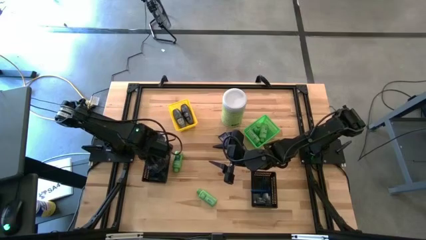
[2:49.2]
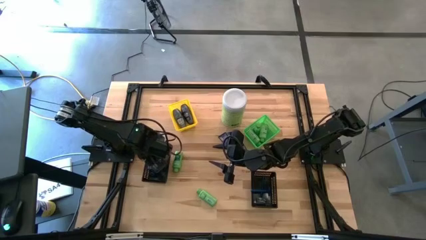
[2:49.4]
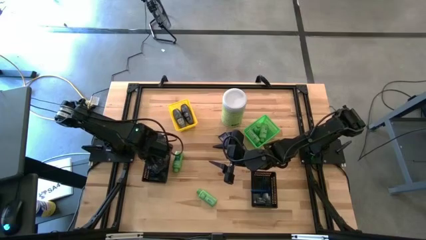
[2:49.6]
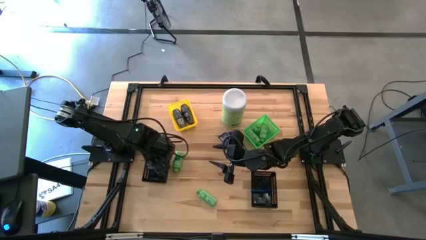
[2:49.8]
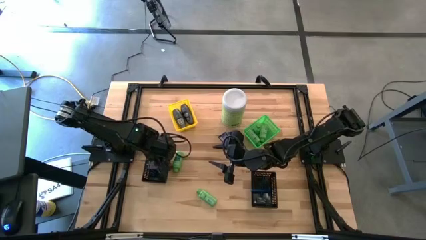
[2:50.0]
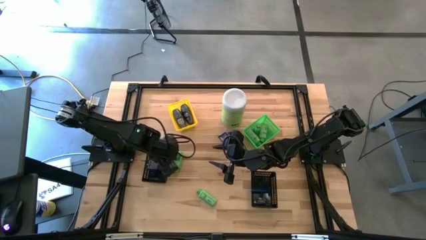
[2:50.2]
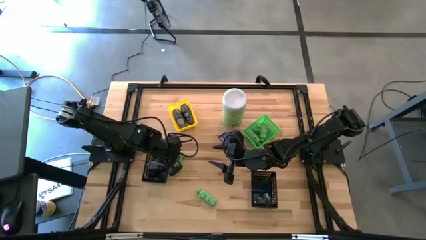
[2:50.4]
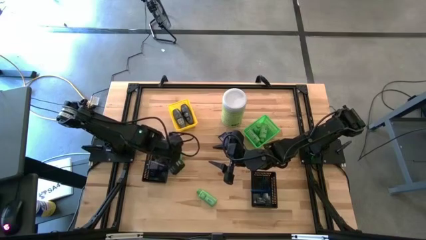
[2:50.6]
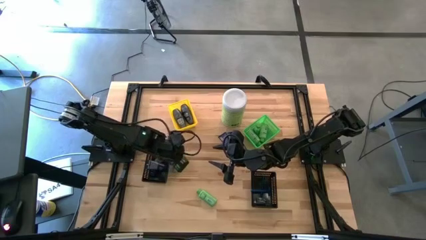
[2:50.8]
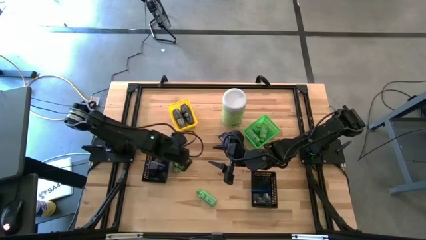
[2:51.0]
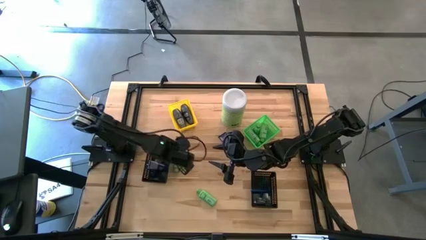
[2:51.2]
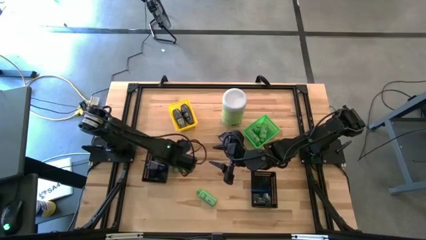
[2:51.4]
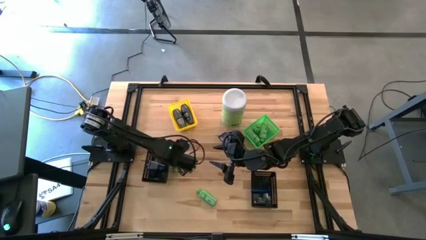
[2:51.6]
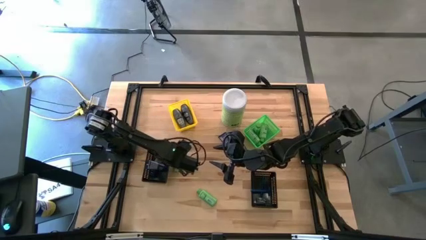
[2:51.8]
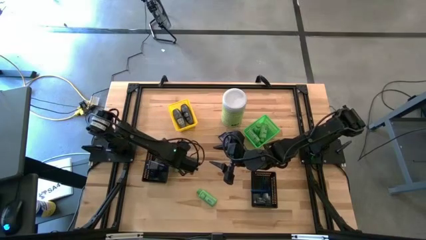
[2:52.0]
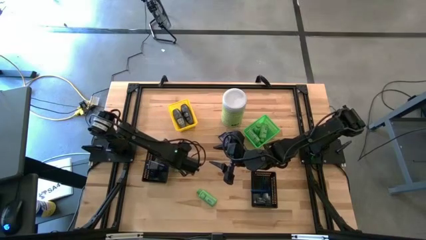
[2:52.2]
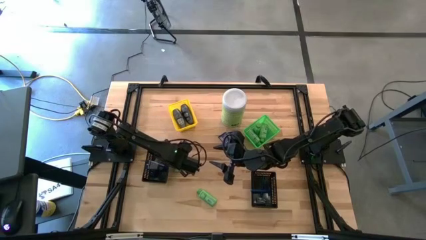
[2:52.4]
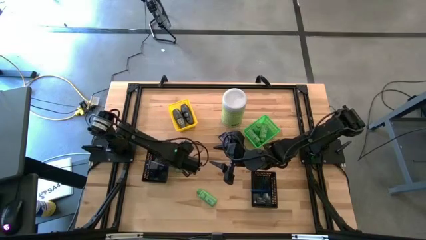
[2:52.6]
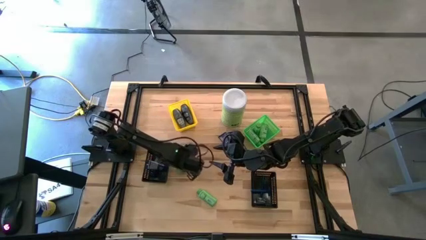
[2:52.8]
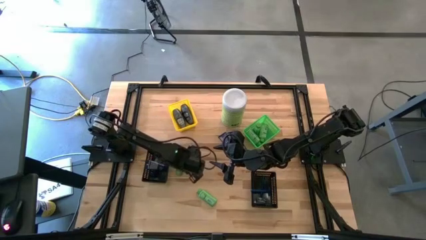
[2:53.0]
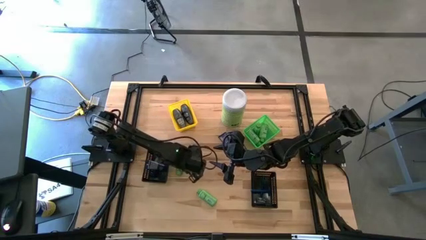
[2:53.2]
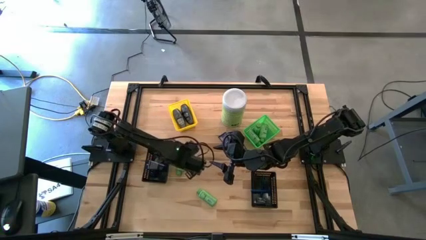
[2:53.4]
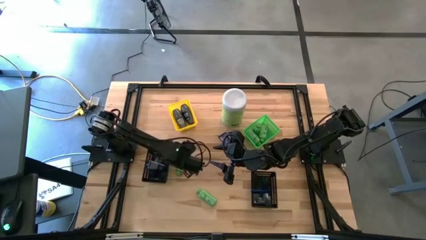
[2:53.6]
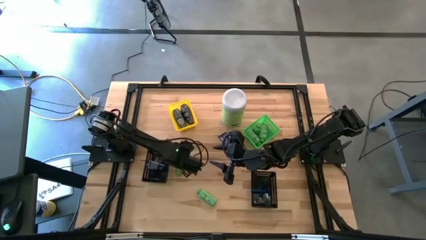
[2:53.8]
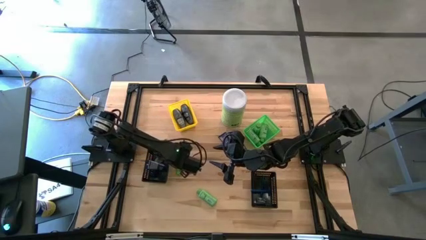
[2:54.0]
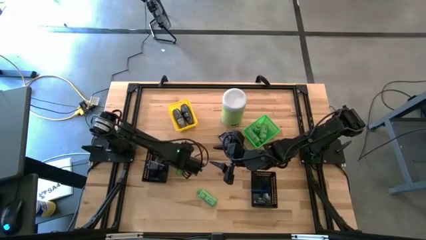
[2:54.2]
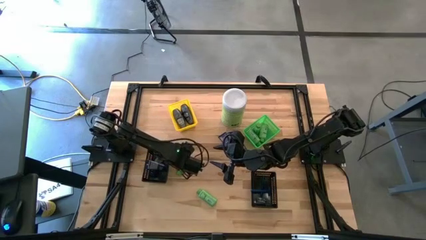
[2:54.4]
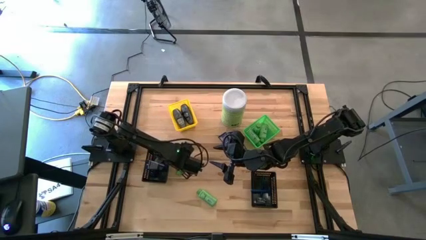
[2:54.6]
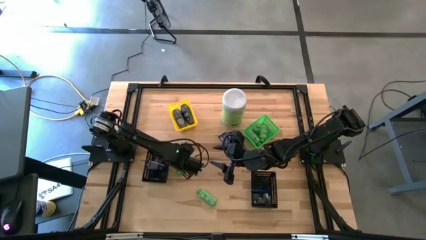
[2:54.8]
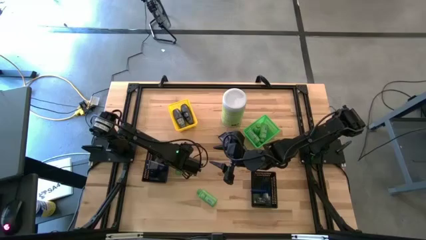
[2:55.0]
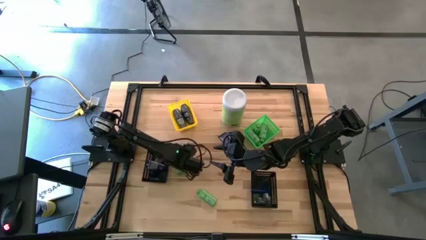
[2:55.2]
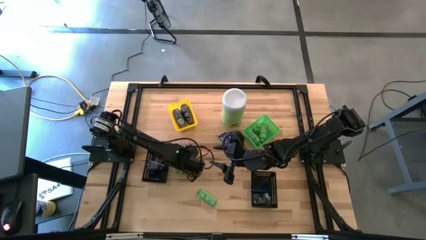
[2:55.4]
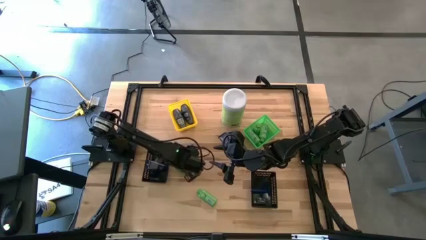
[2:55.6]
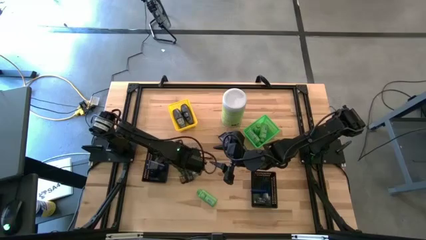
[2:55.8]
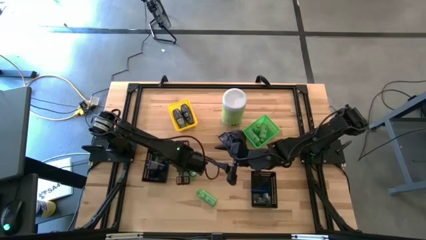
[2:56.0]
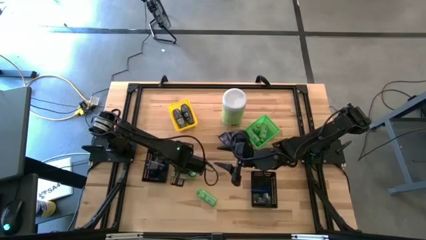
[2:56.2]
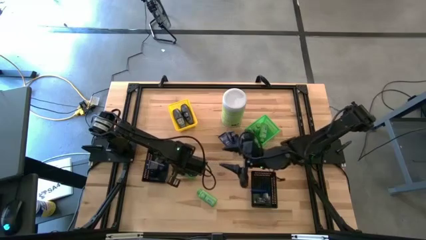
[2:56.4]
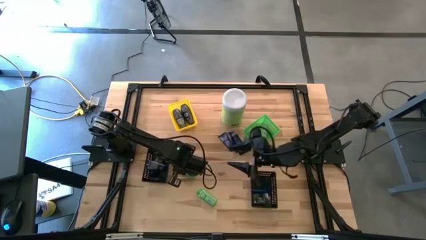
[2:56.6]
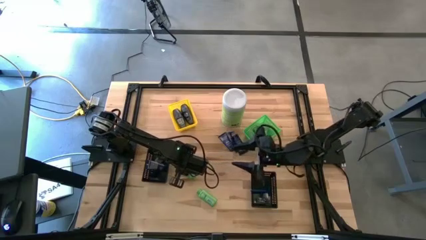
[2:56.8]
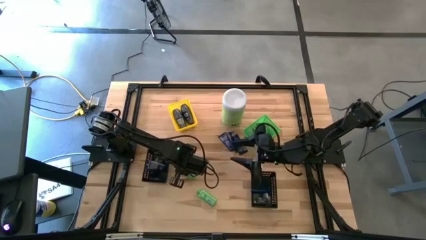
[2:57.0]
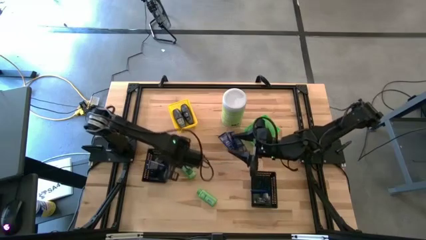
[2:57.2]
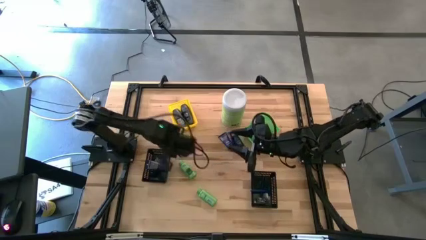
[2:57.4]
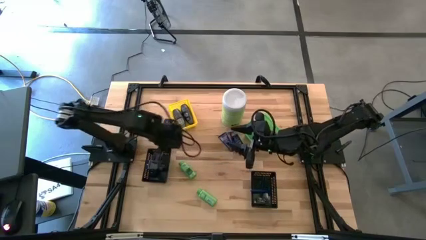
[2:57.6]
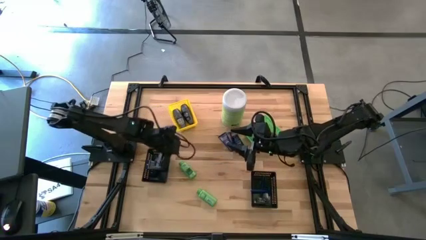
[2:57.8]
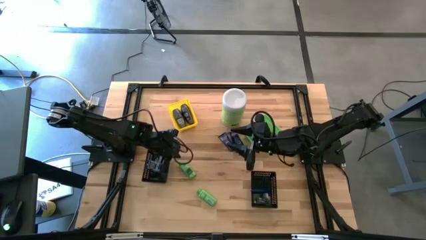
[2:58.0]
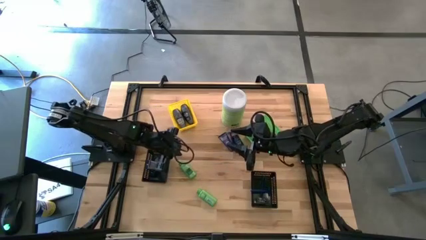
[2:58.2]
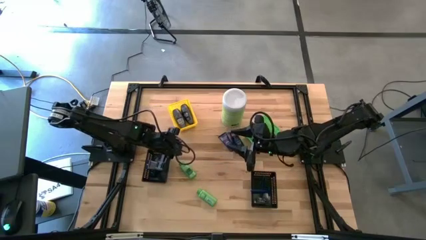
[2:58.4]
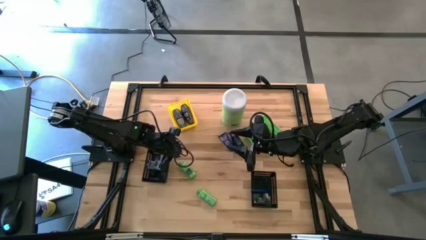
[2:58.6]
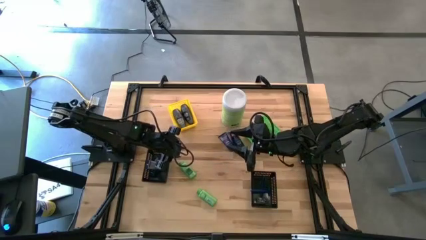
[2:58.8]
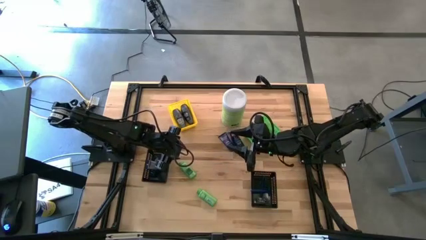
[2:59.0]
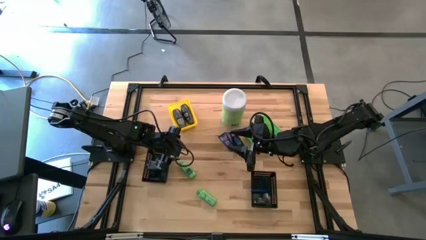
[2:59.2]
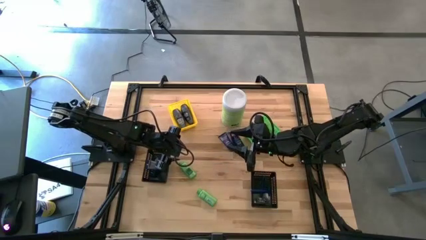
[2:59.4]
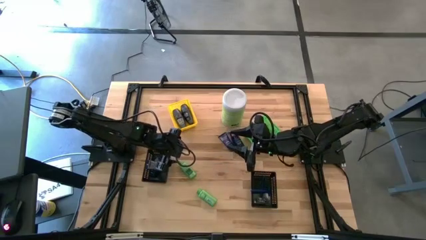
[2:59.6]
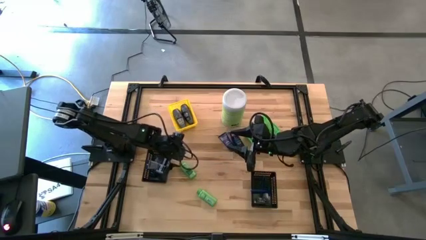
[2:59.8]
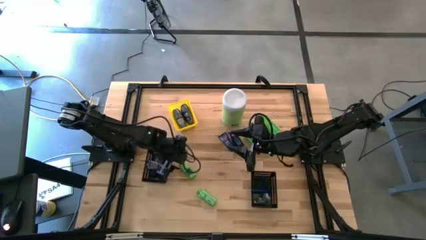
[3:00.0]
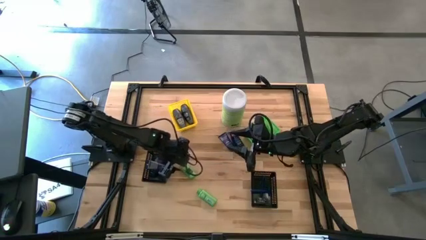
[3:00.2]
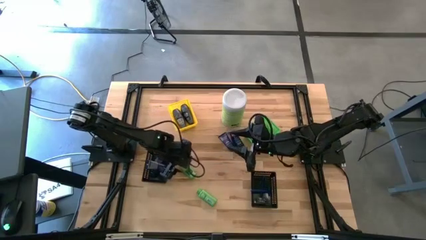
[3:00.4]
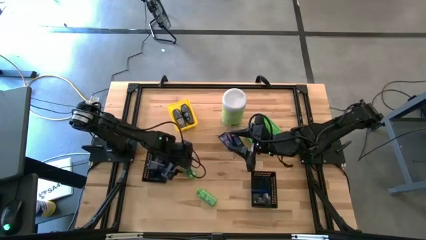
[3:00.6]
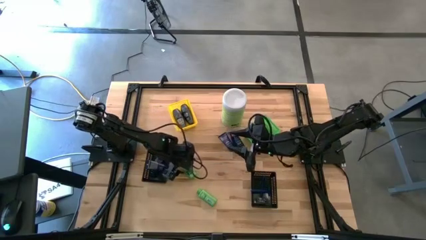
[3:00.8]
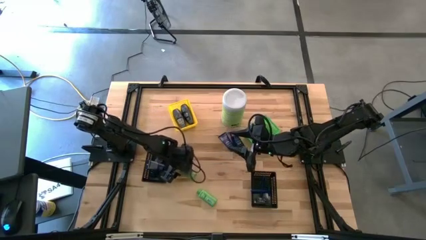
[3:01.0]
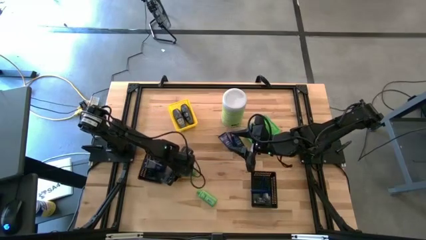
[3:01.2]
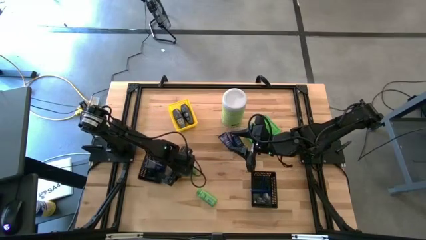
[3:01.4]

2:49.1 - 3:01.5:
Task: Pick & Place Travel size toiletries
Put the shampoo bottle bottle into the green bin

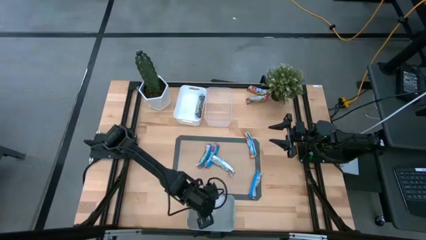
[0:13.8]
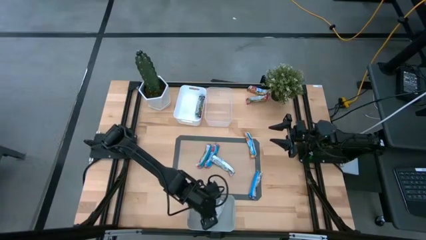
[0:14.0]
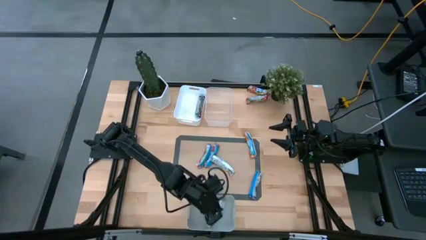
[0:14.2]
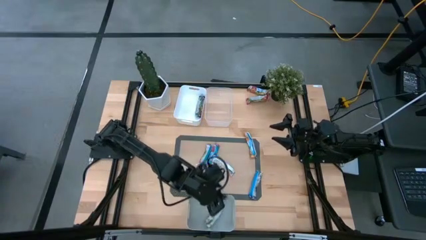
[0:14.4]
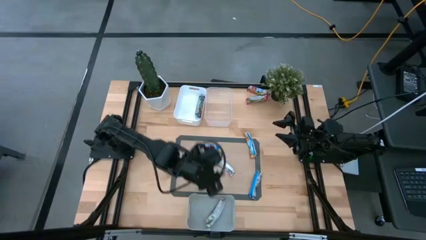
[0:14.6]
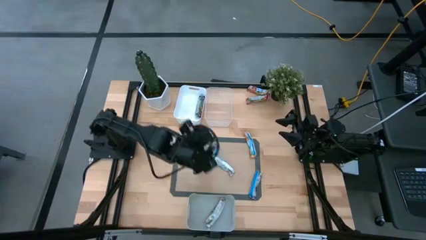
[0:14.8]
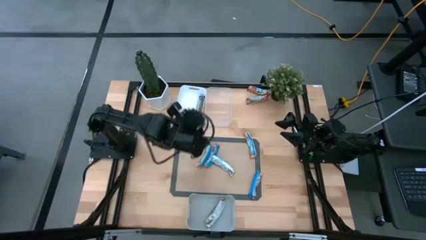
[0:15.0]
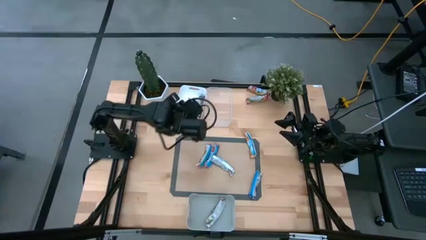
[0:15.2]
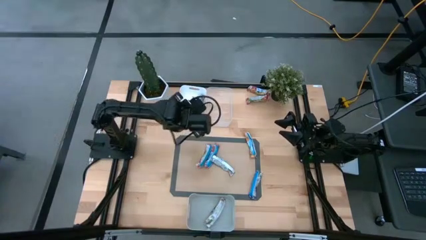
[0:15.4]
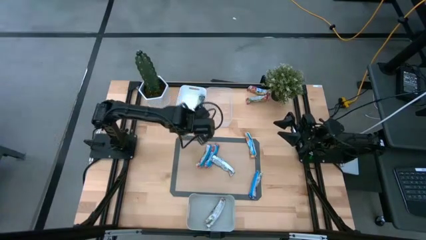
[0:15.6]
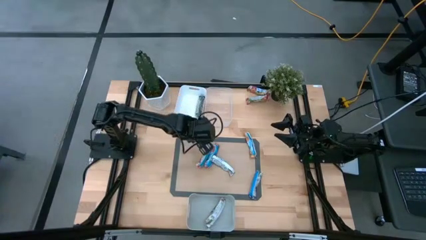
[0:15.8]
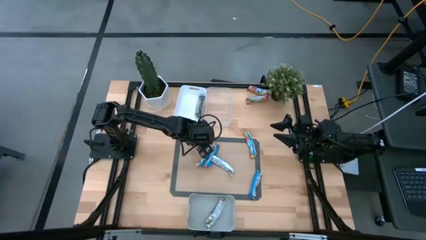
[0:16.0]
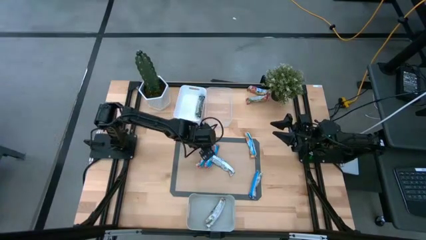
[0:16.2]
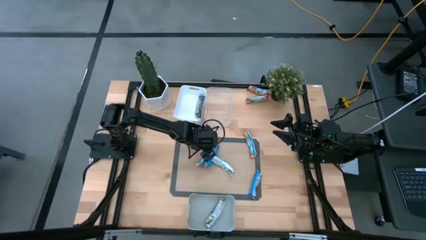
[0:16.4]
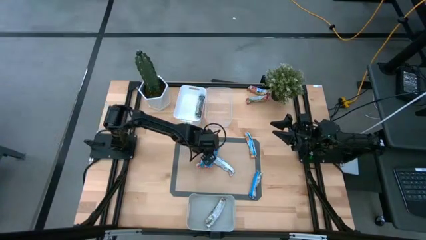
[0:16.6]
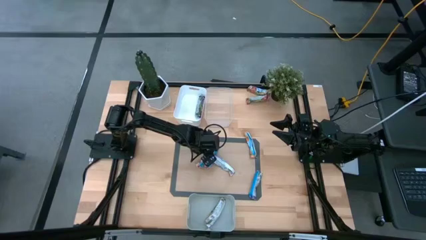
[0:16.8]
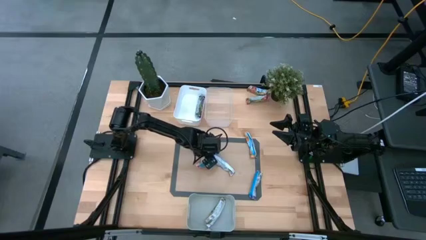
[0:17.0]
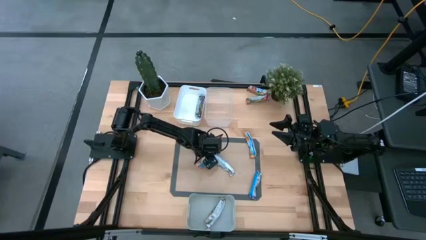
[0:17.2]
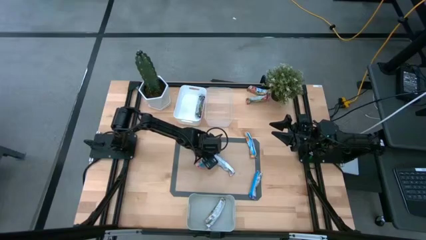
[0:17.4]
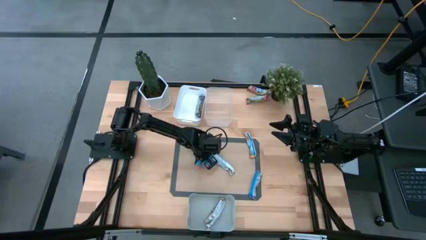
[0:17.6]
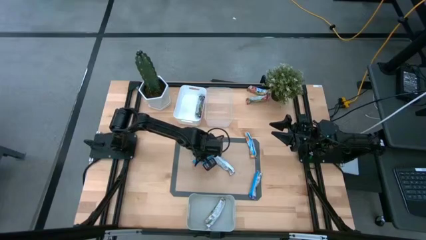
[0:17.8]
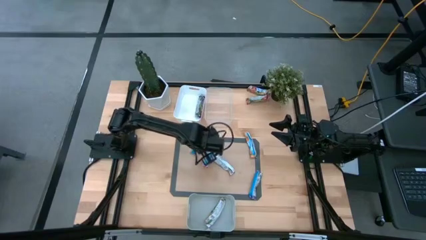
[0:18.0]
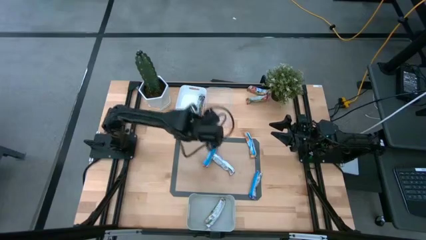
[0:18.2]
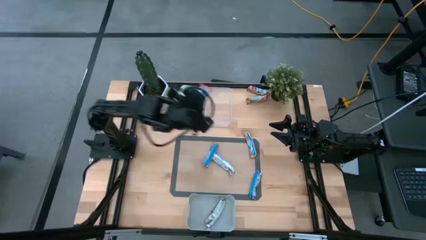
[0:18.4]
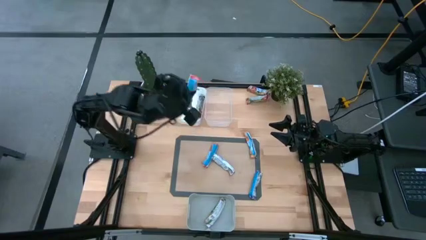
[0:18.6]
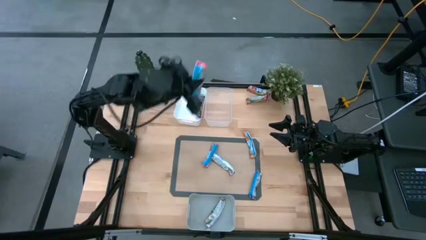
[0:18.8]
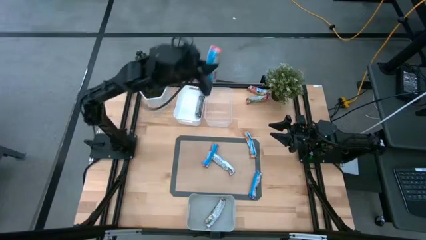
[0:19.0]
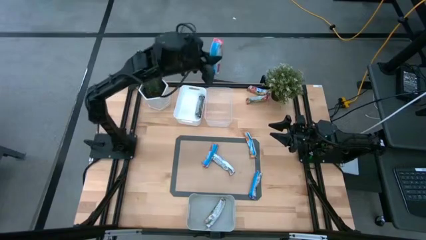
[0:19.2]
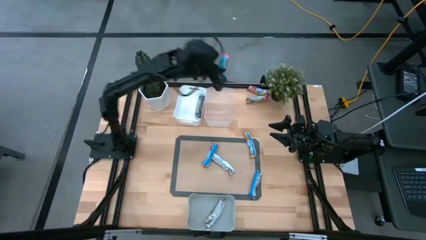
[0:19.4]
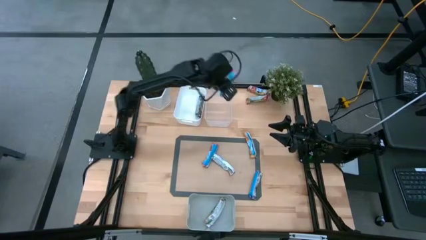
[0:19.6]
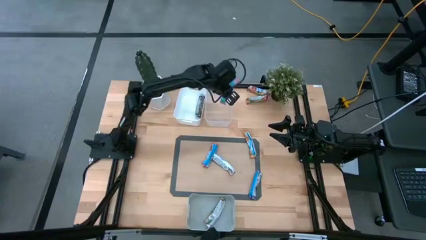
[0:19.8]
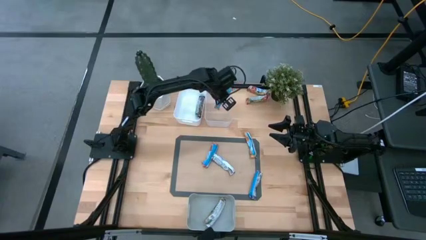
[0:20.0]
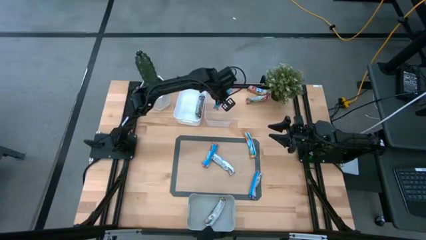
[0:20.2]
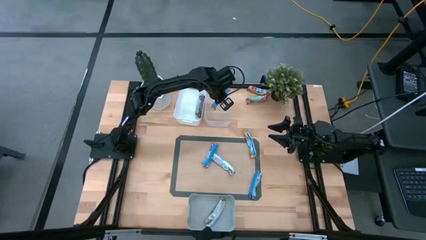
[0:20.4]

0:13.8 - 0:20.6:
Task: Pick and place Granola Bars by type
Put the red granola bar into the transparent bin
